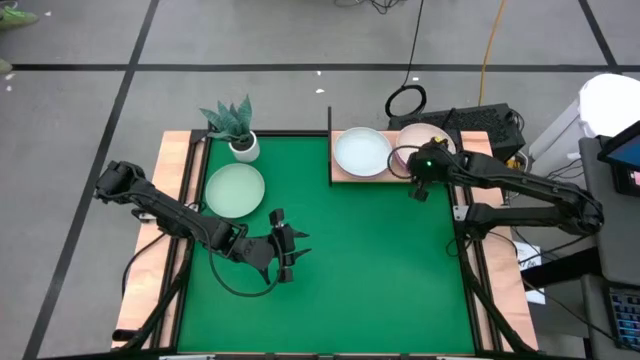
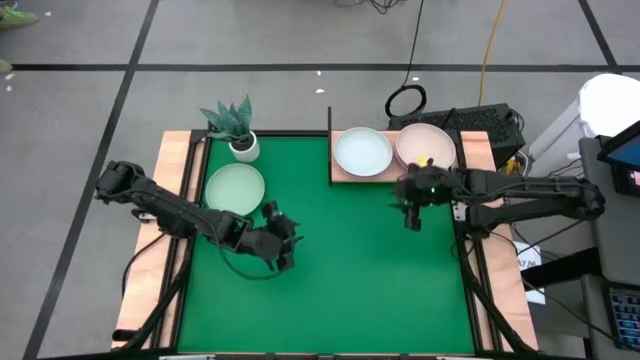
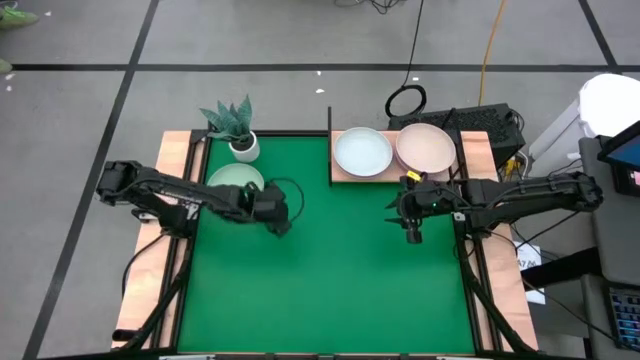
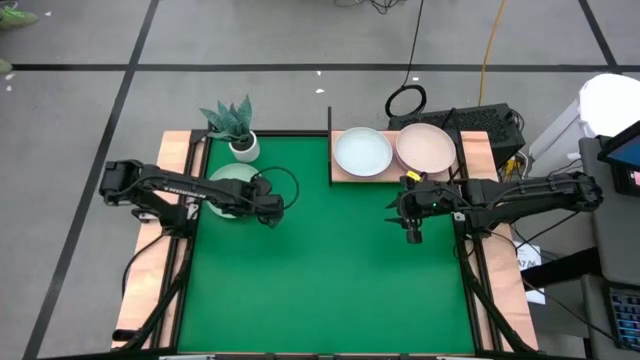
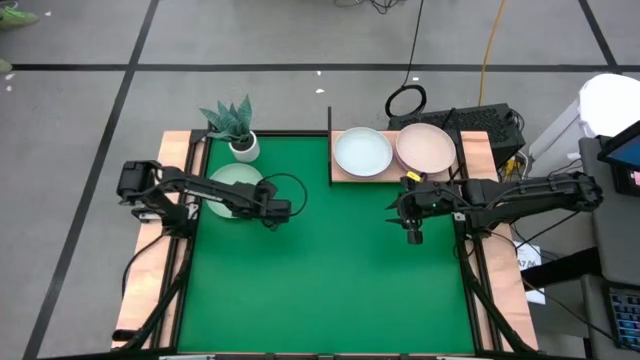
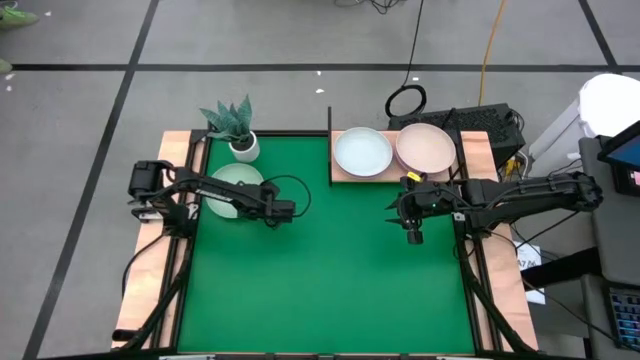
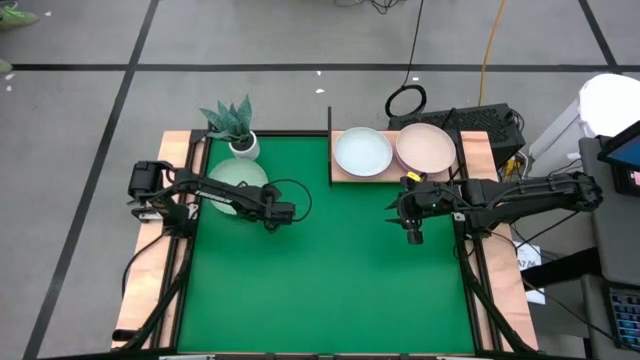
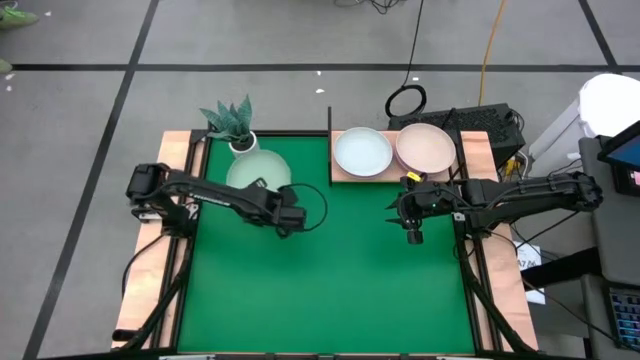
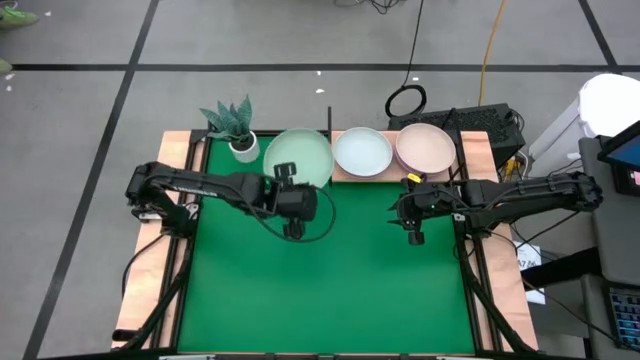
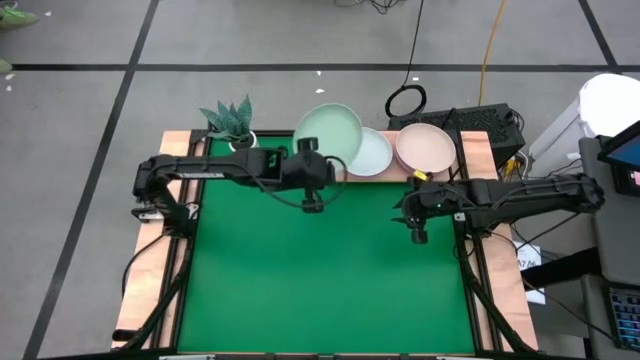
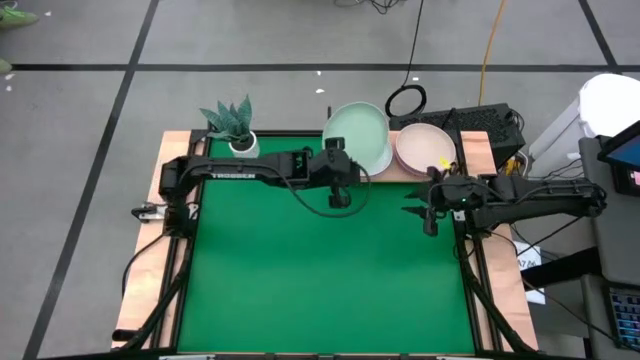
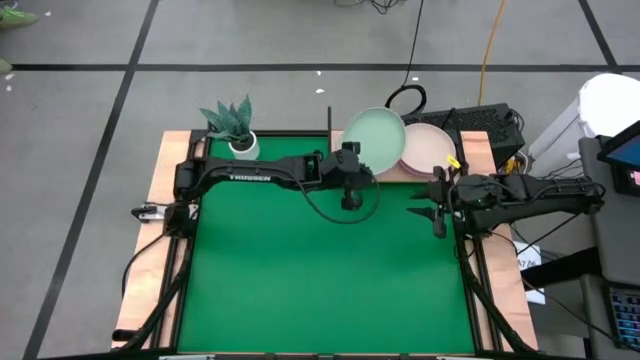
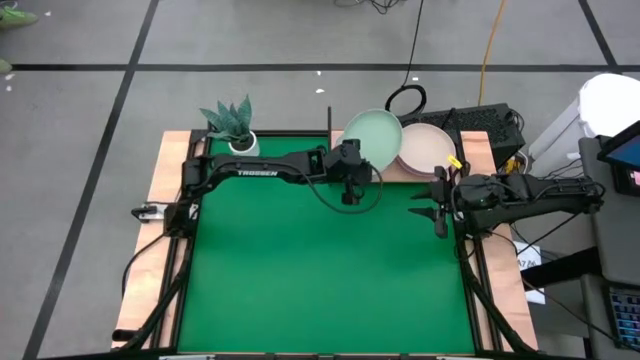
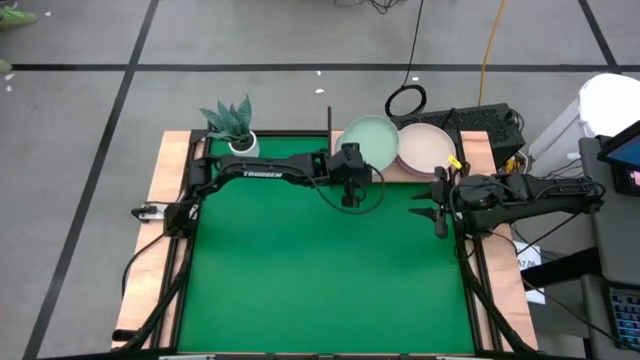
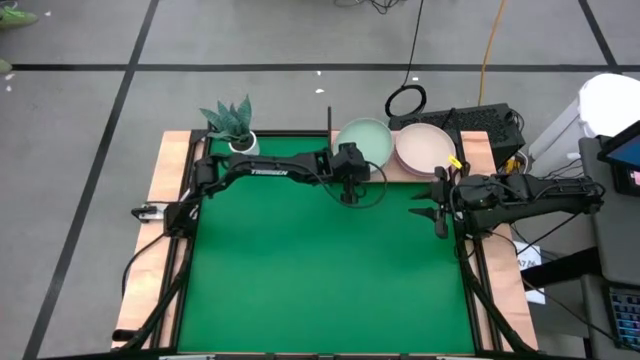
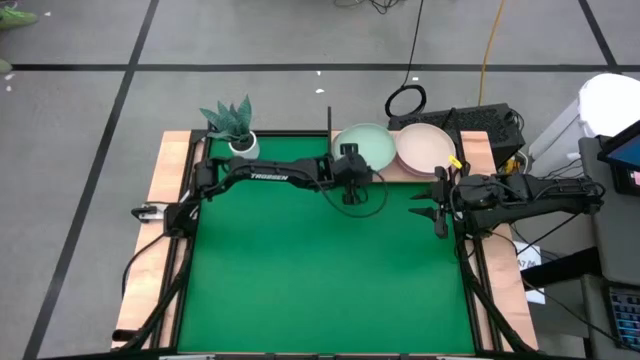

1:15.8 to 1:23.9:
Task: Place and stack plates onto a shelf
Stack the green plate on top of the gray plate on the shelf

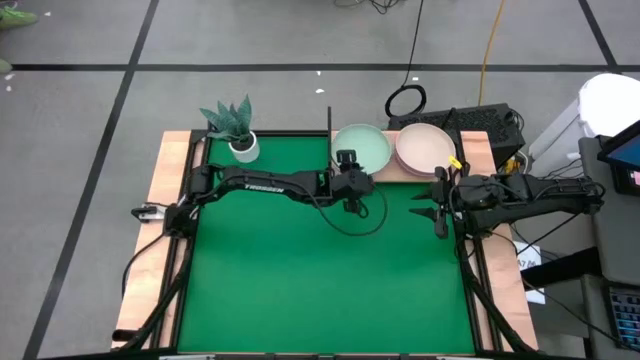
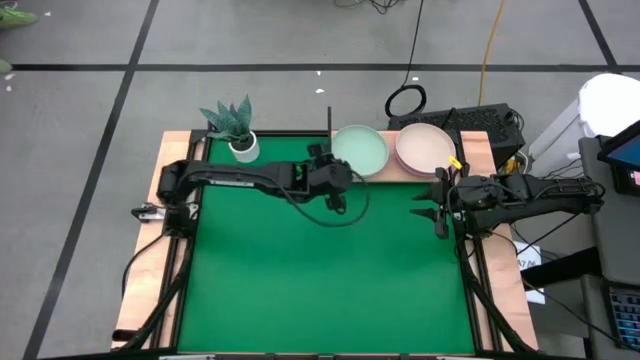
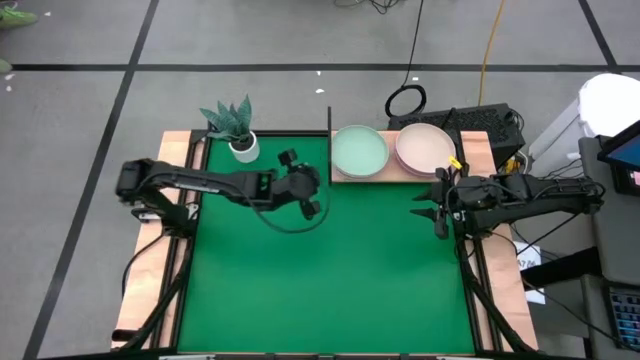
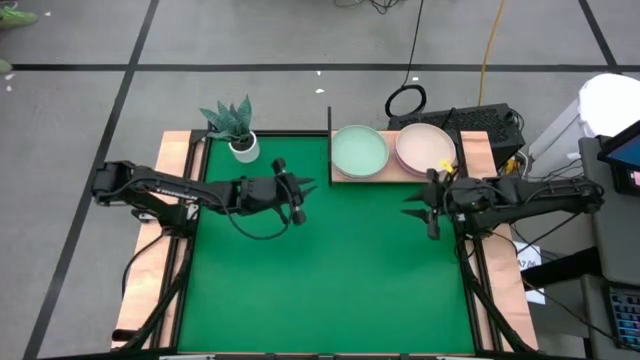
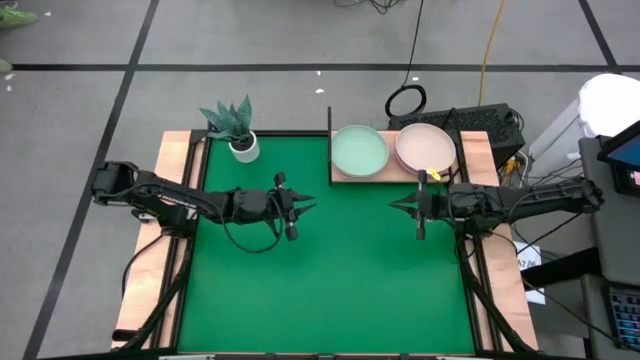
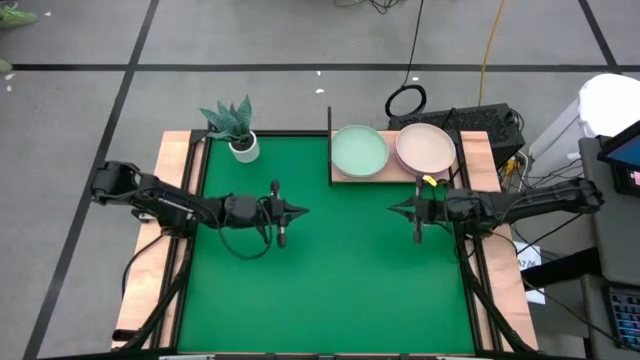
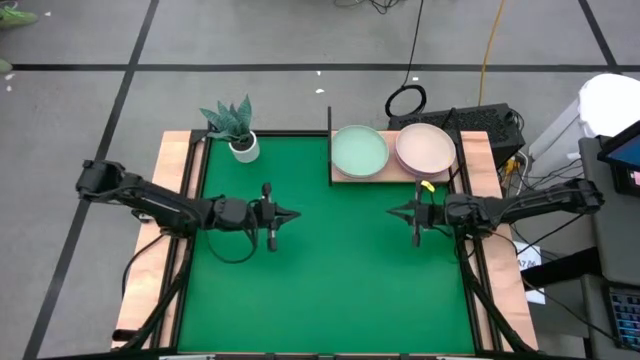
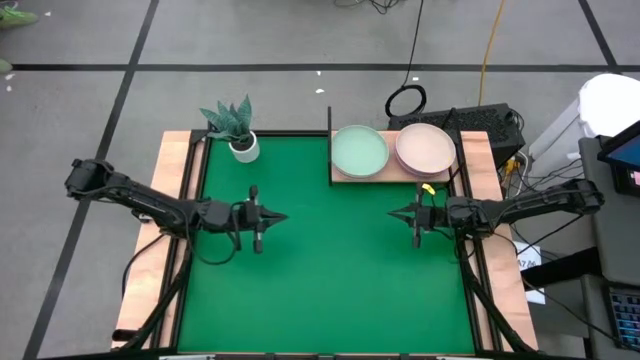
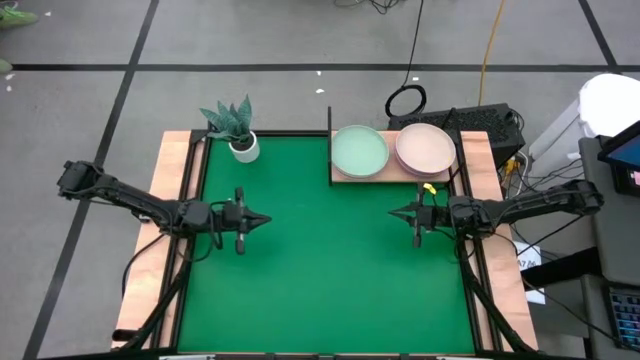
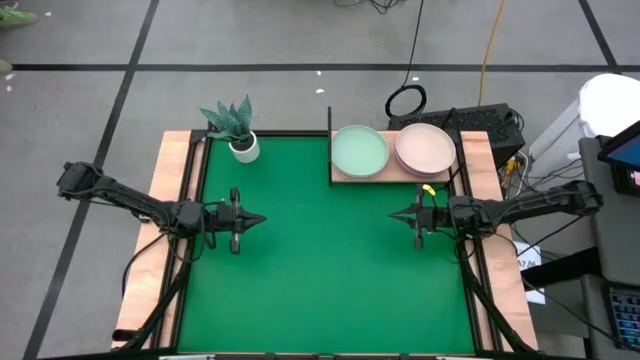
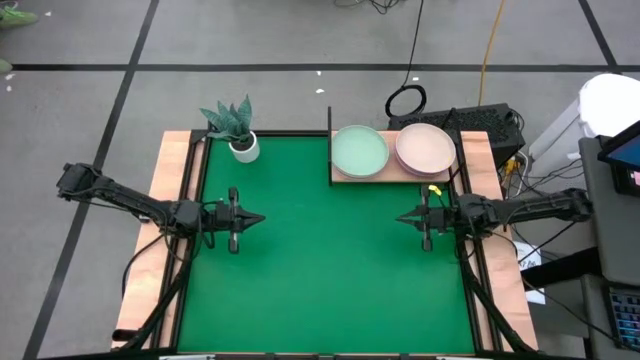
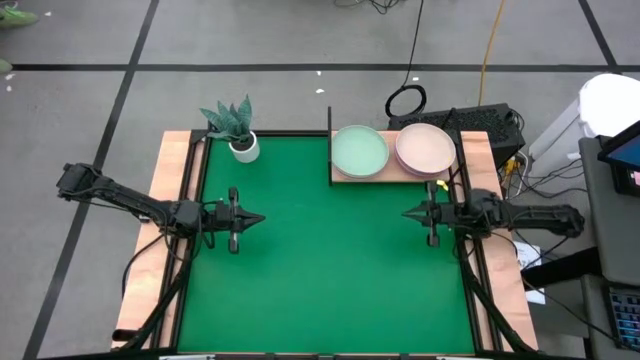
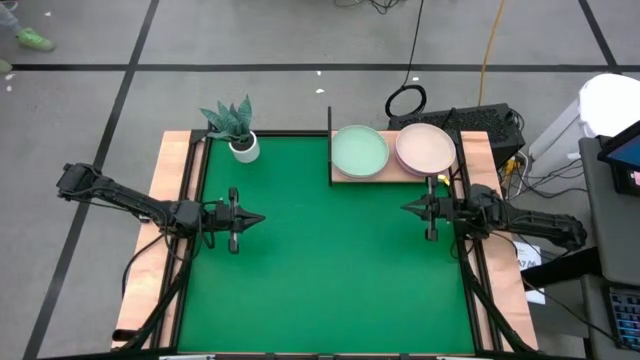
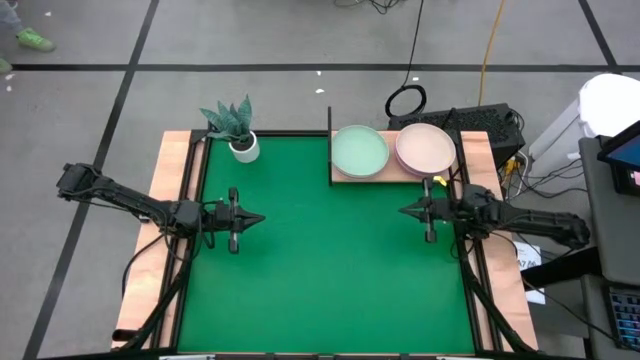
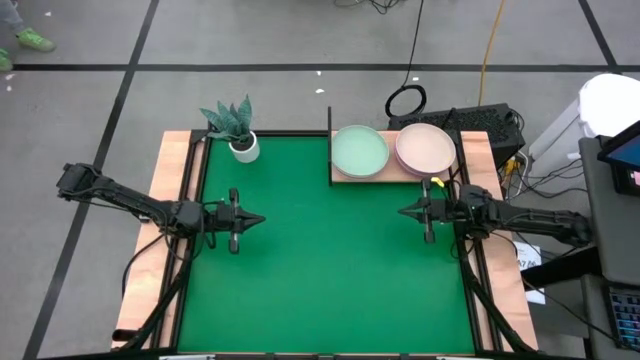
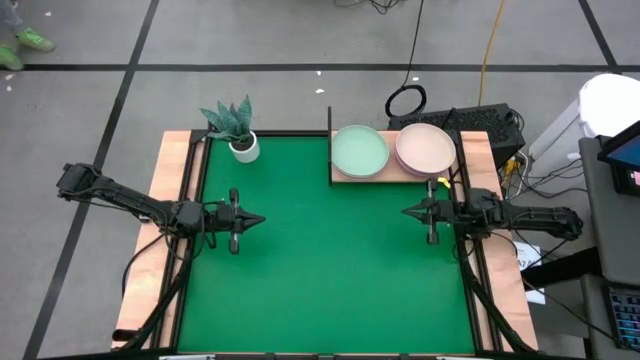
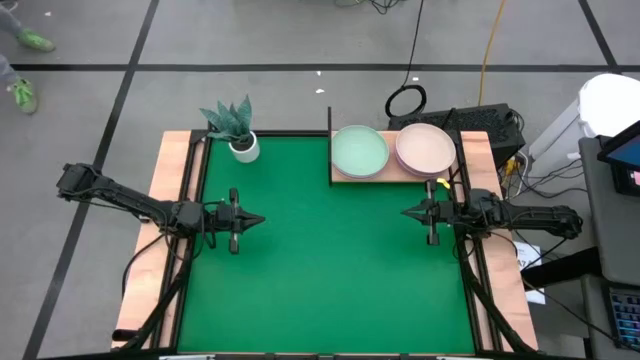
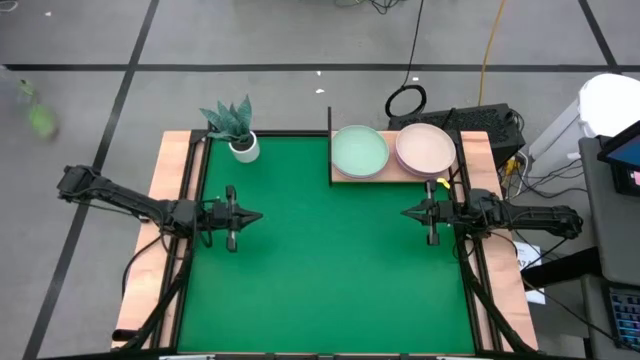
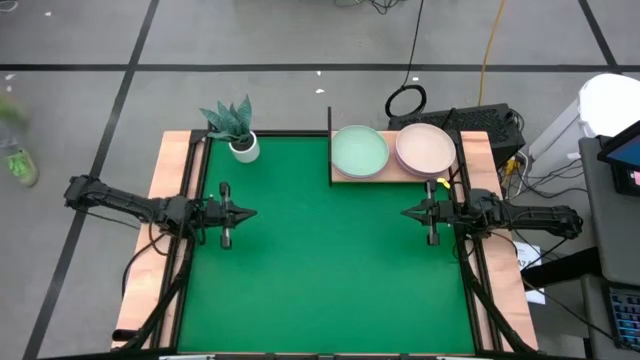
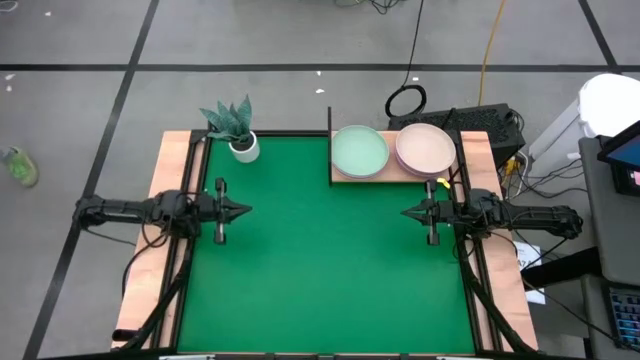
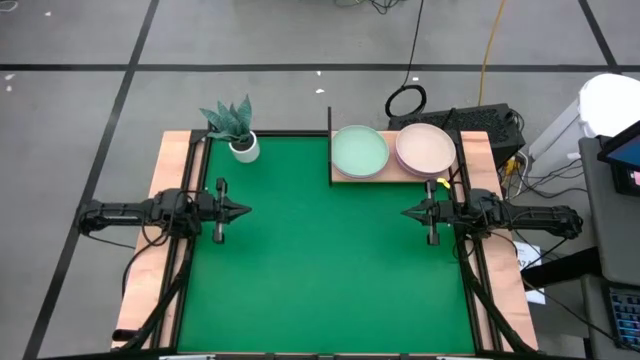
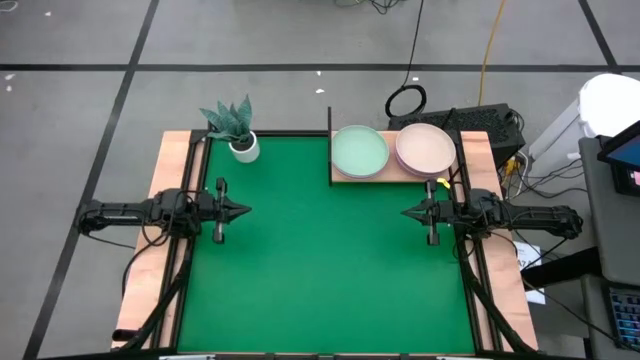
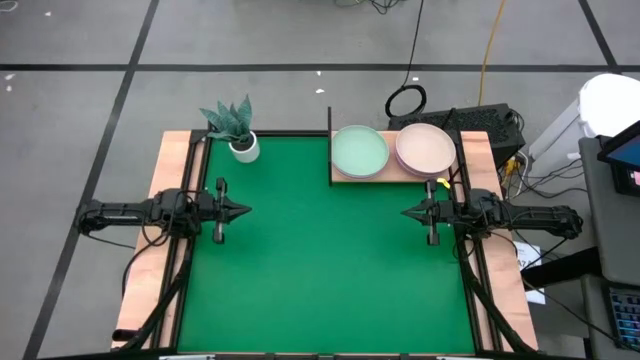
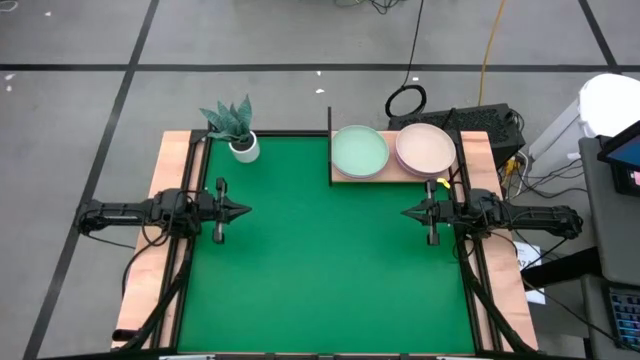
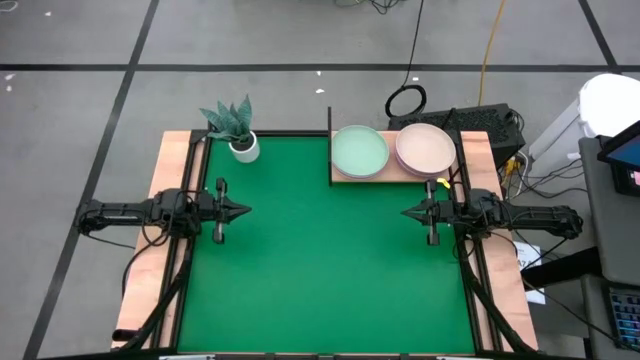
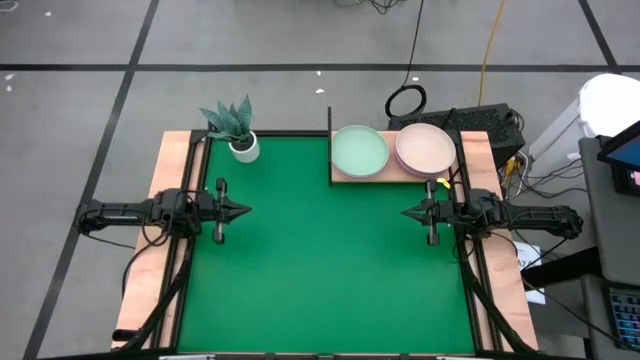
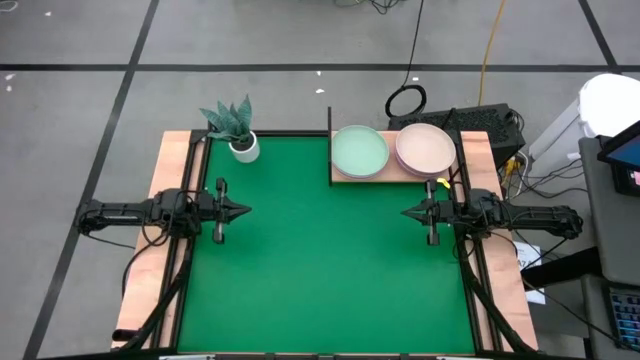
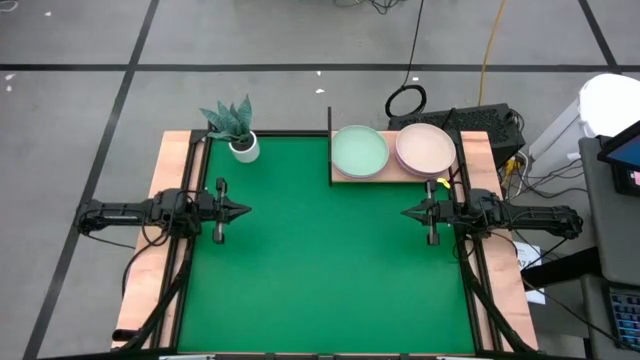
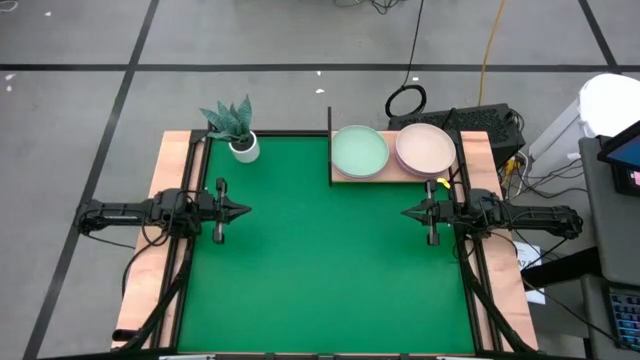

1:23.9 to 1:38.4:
Return to Home Position
